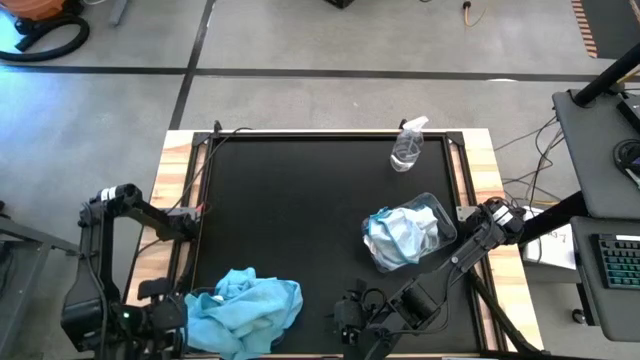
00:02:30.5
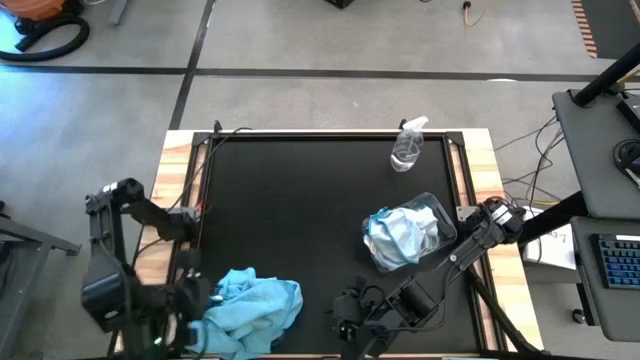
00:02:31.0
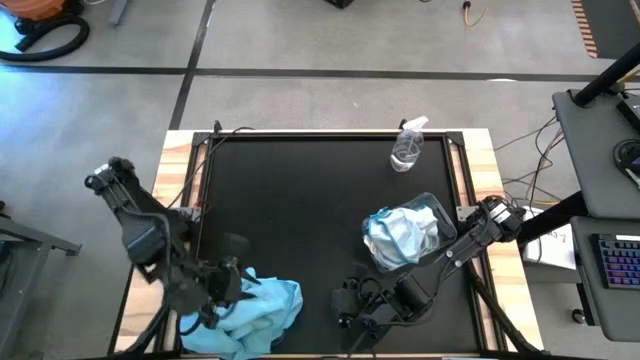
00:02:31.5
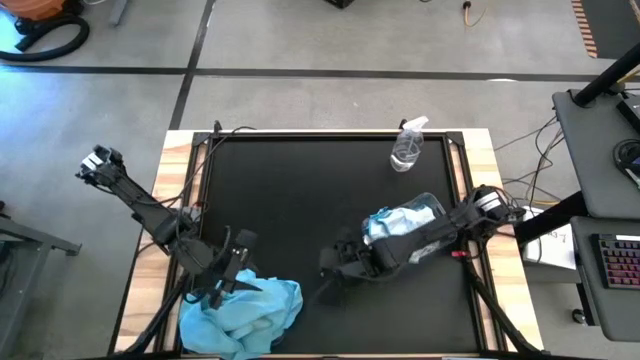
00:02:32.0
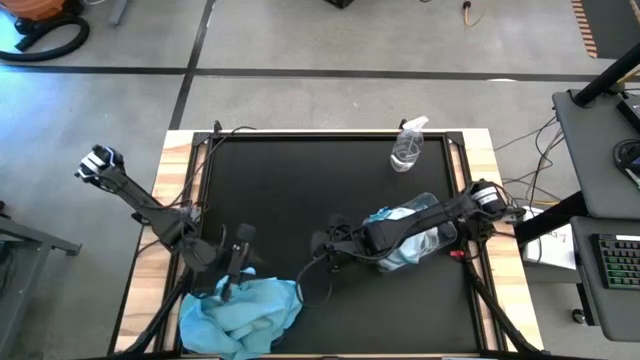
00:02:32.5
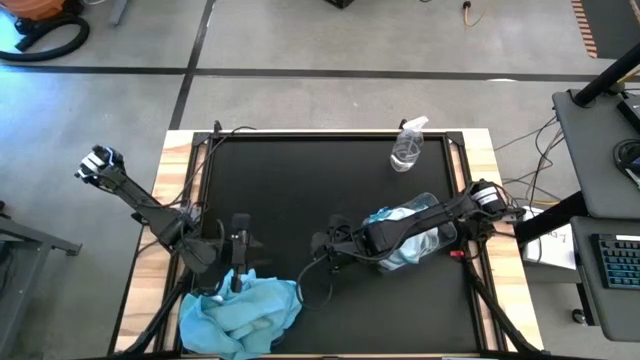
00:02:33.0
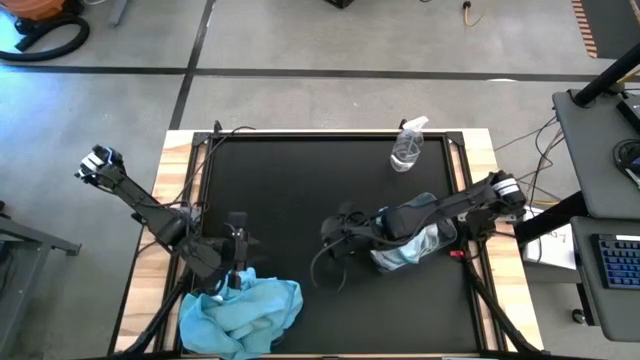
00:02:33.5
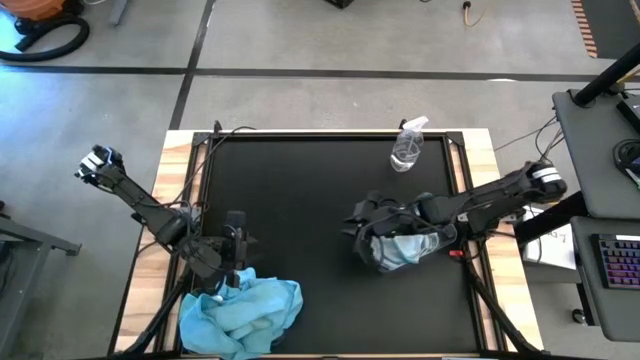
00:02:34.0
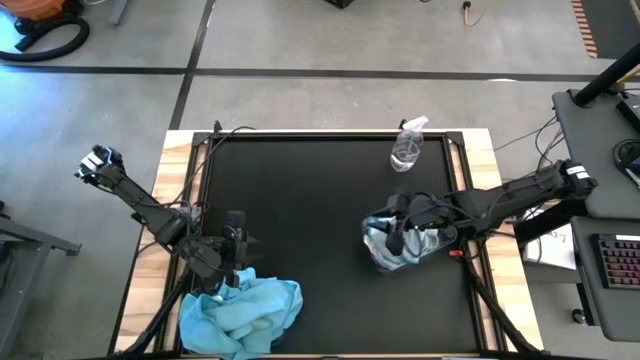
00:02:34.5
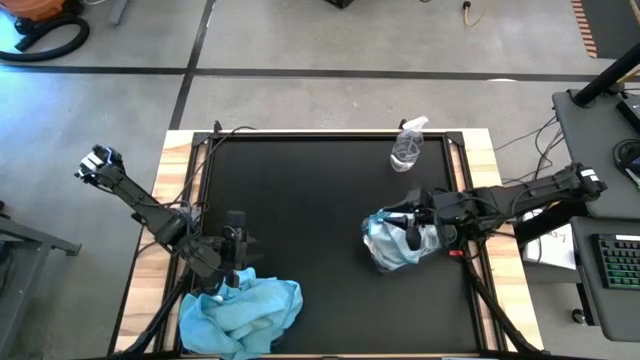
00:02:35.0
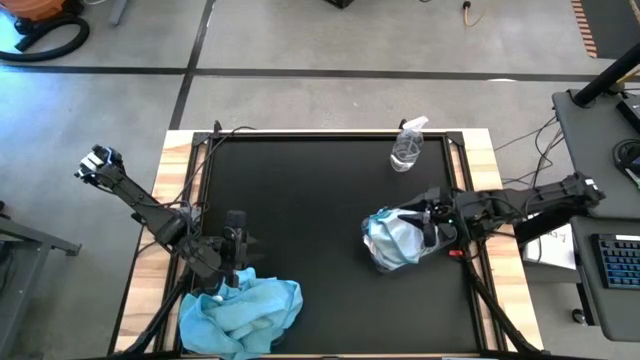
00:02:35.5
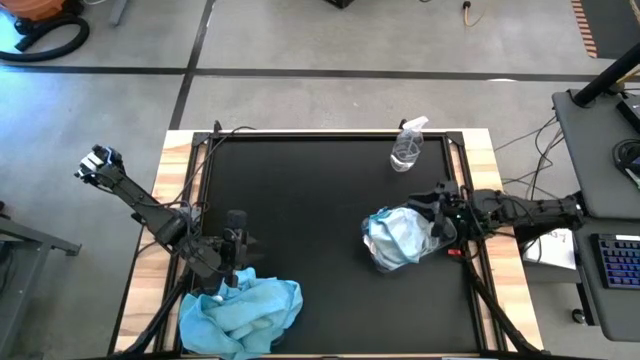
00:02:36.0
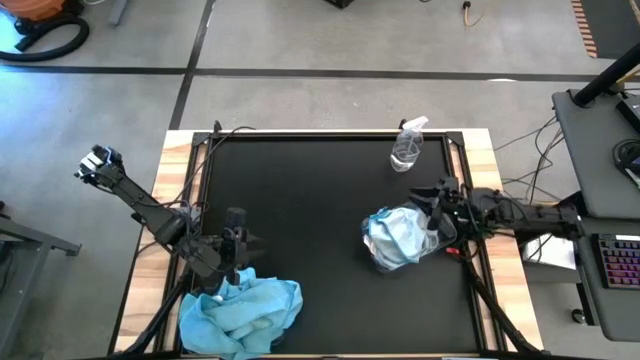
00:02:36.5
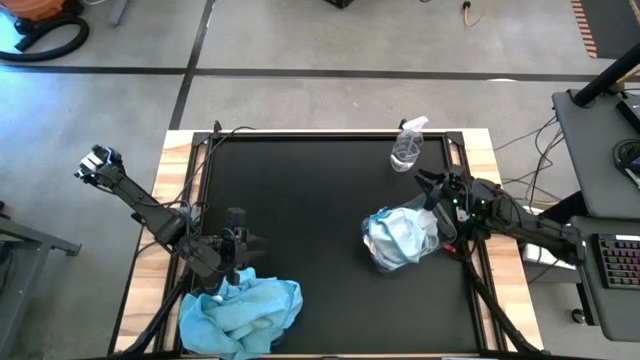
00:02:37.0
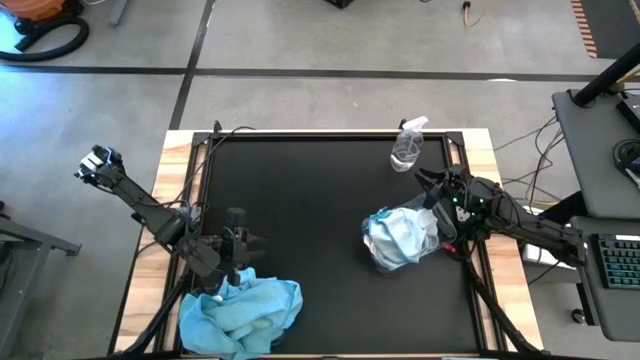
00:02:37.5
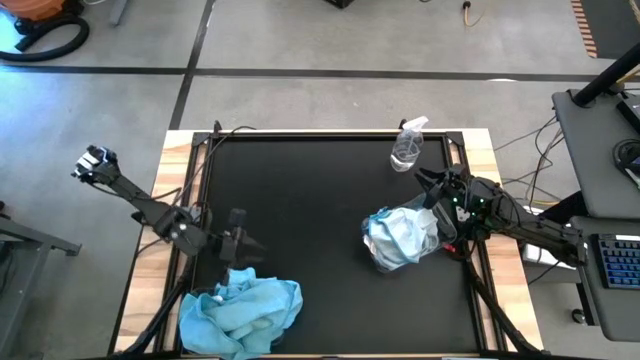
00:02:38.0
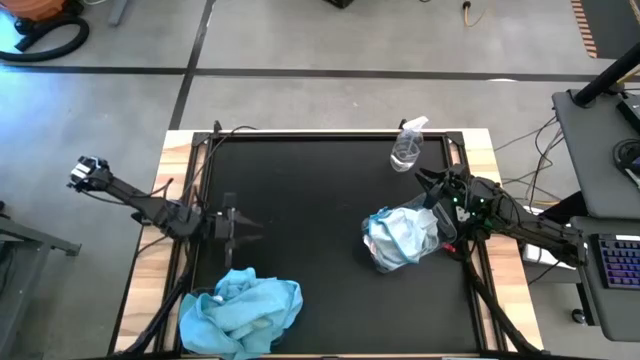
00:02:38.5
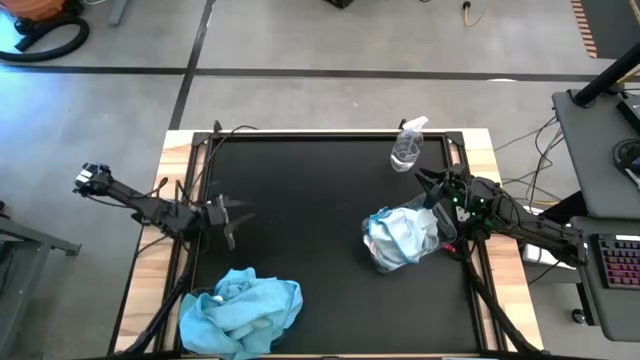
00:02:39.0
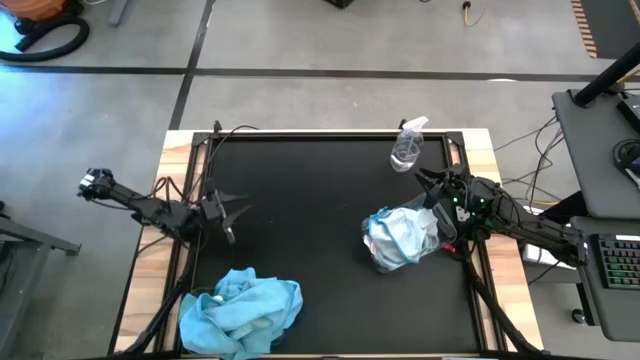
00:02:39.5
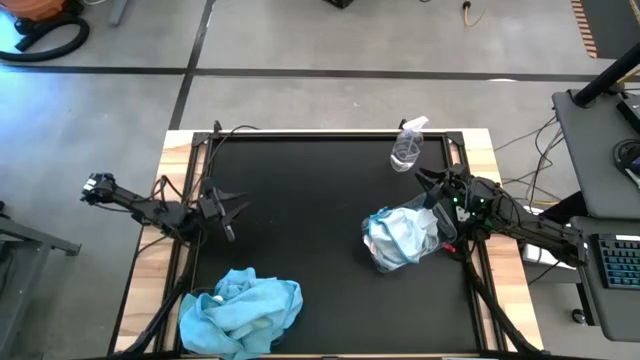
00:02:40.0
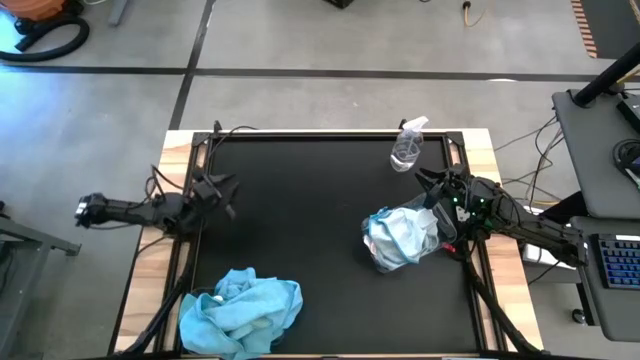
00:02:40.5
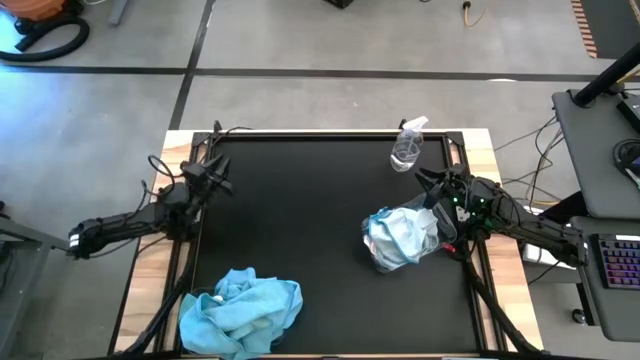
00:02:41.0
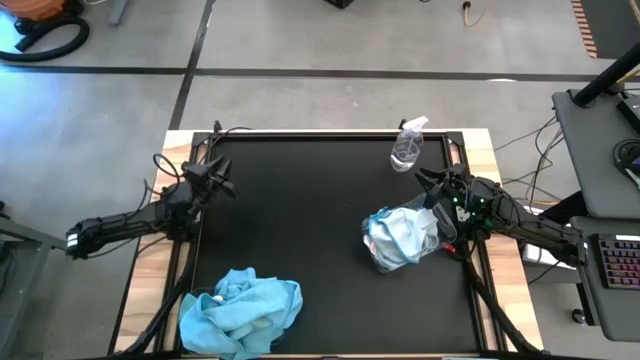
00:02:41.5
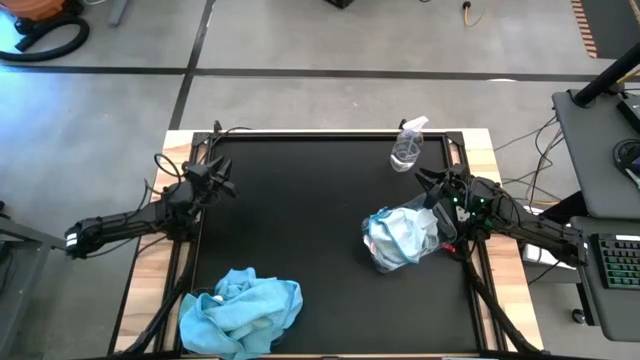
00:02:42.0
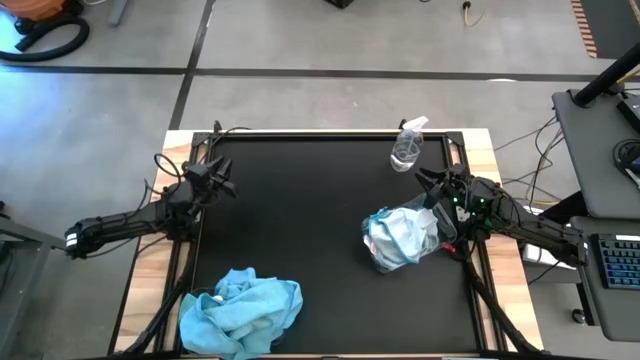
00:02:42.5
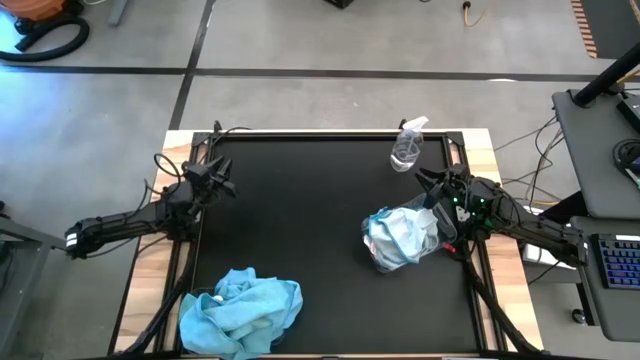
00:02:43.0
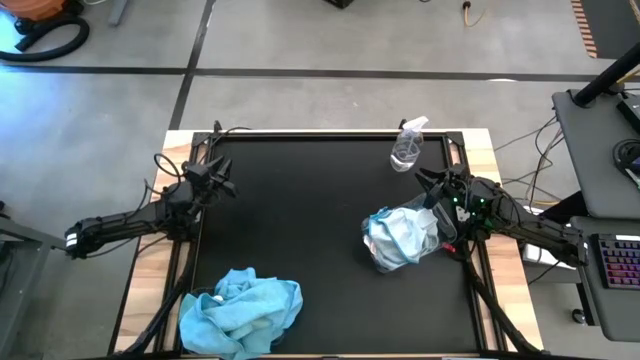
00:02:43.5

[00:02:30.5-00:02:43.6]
Task: Sort microfiber towel by color & place in baskets
Return to Home Position

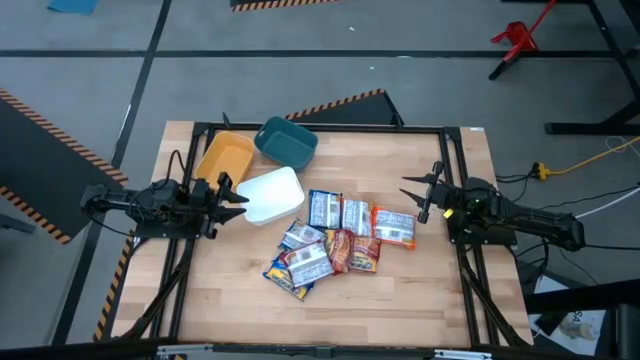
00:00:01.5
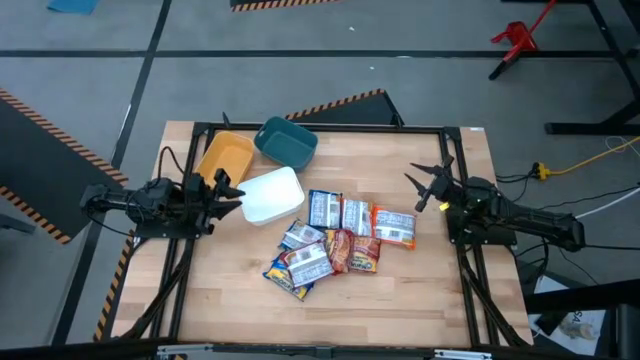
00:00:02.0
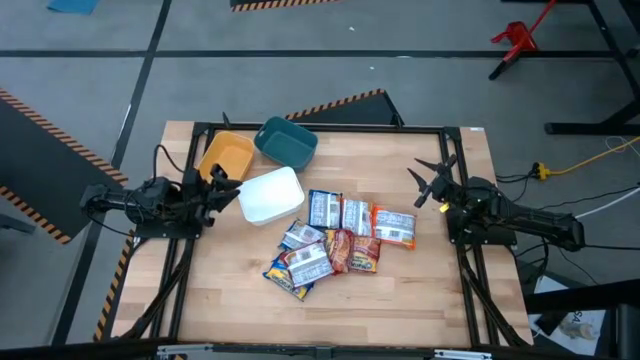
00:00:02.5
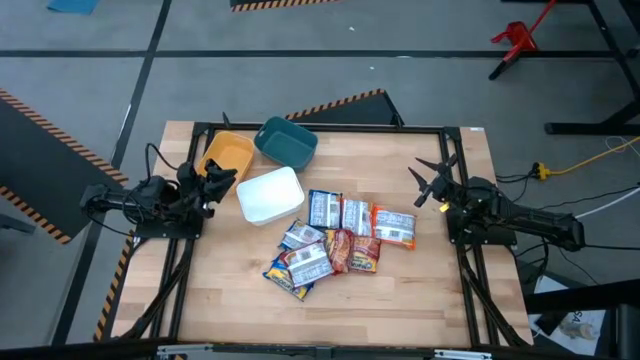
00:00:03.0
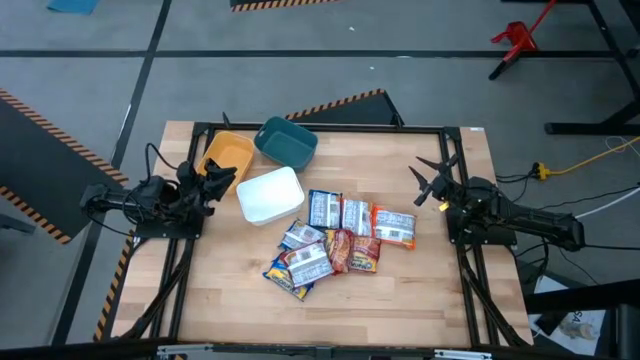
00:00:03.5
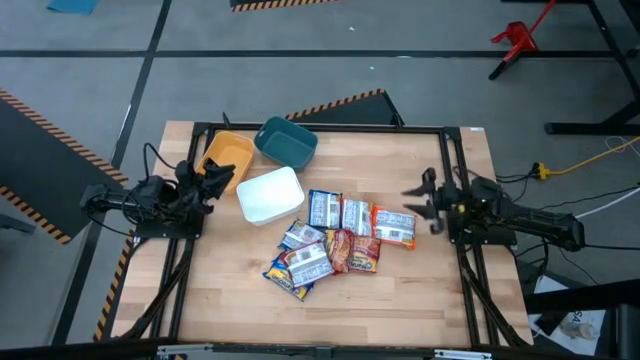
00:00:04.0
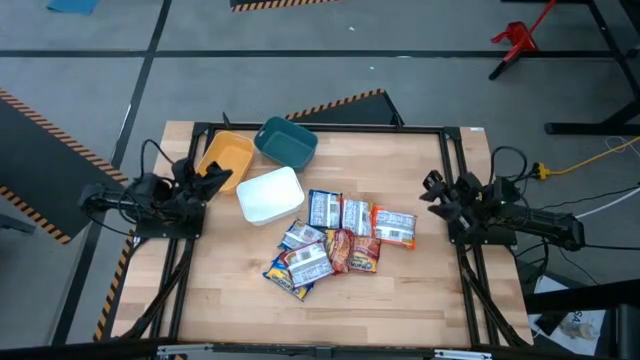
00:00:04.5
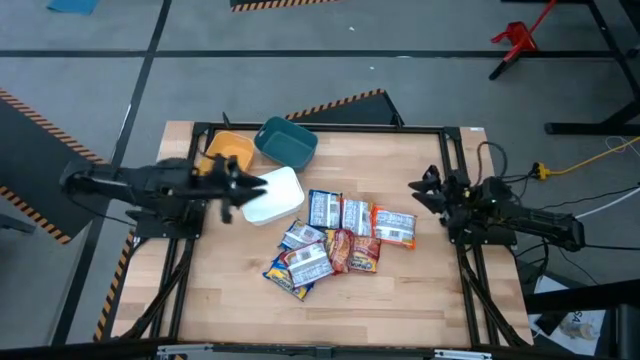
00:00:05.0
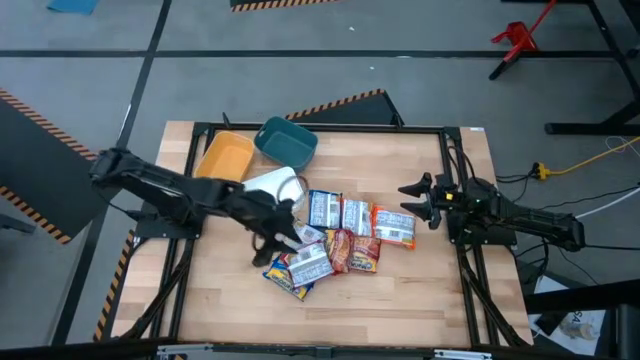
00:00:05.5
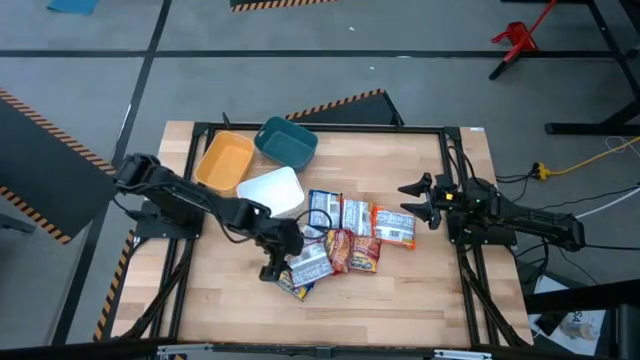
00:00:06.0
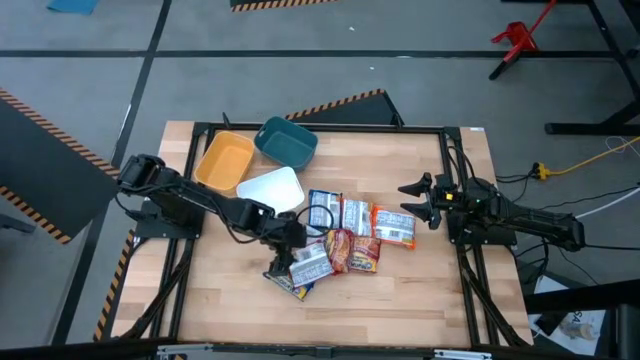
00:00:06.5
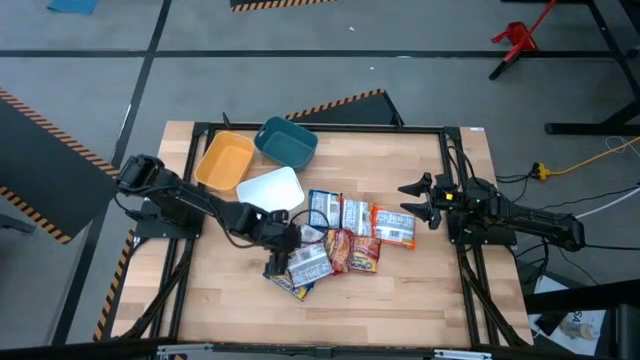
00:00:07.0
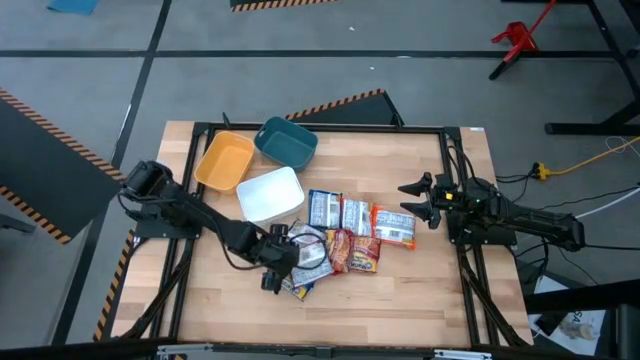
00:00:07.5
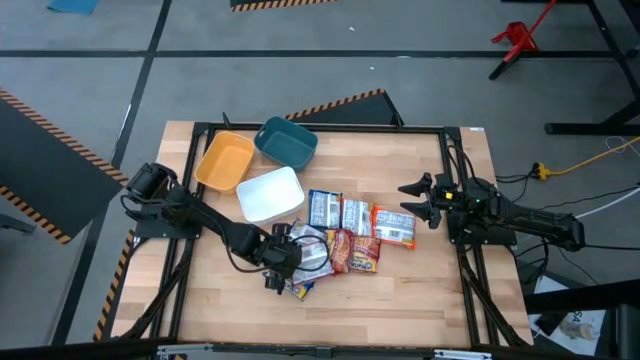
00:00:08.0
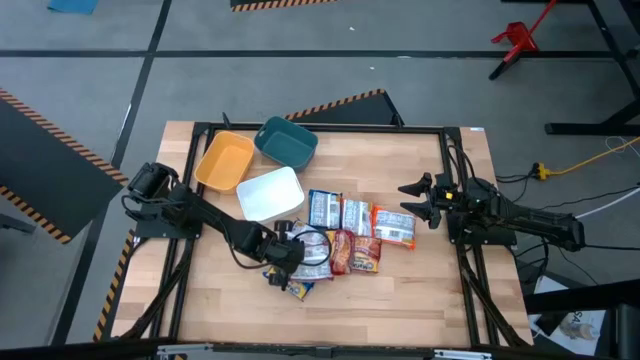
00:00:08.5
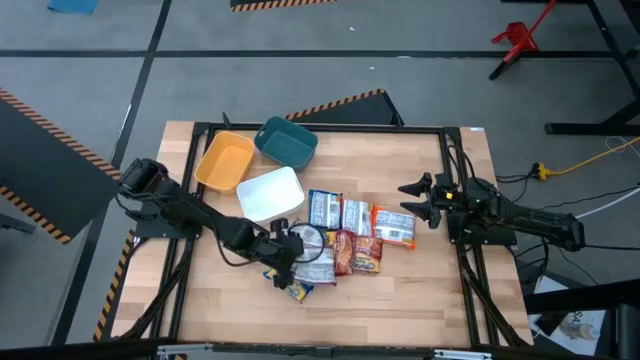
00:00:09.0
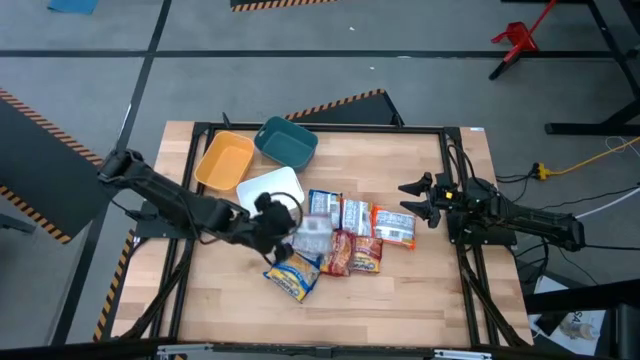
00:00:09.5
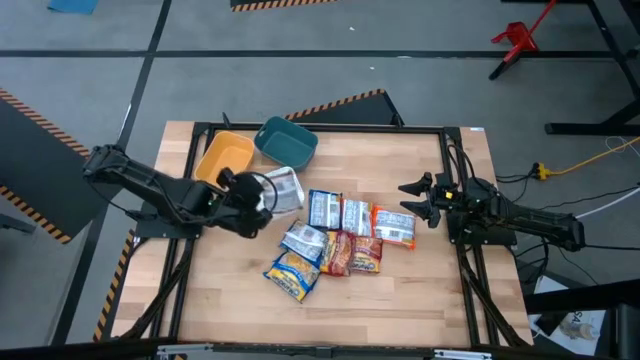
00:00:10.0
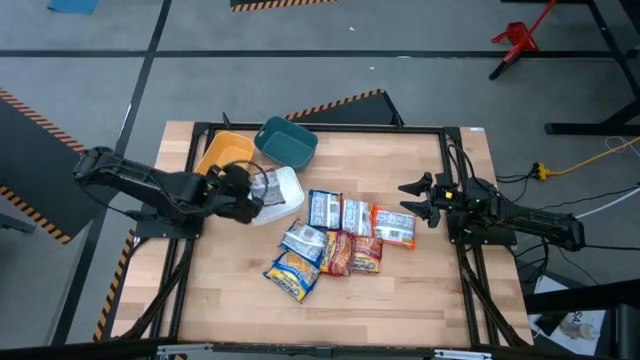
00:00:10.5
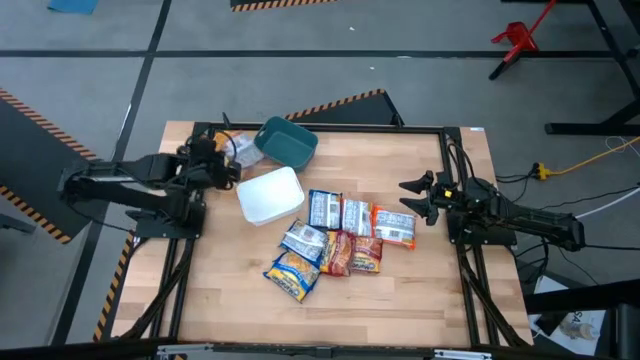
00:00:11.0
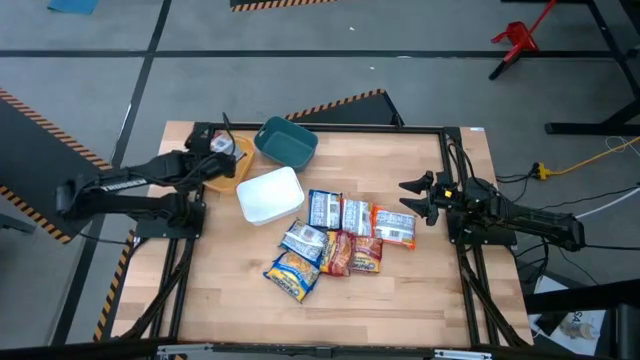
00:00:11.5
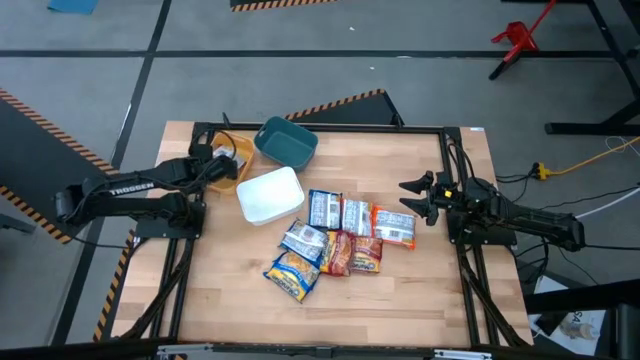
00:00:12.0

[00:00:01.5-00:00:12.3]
Task: Sort Maruchan noodles
Put the bottom left red noodle into the yellow bin
